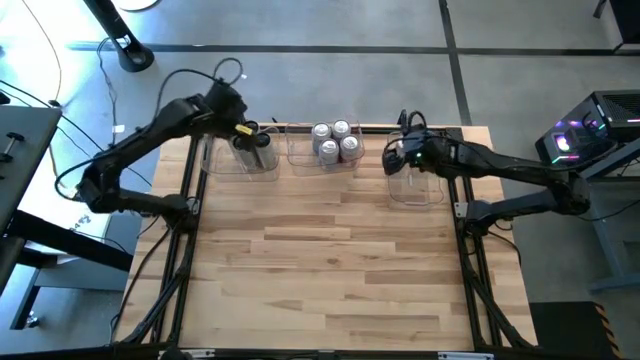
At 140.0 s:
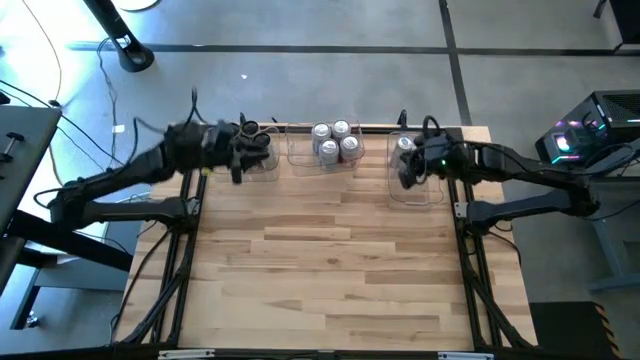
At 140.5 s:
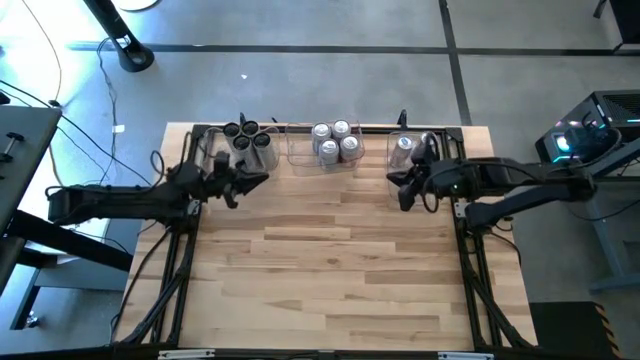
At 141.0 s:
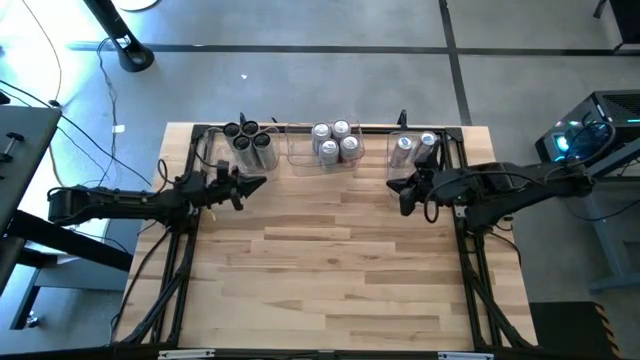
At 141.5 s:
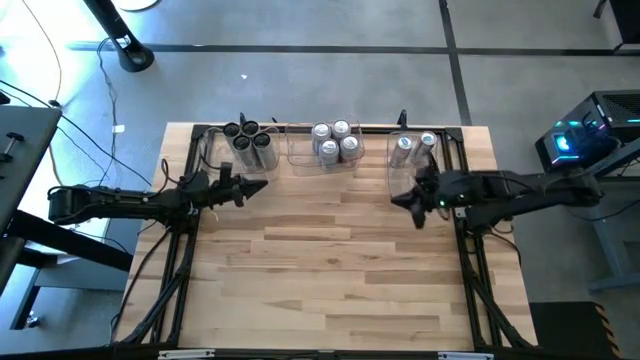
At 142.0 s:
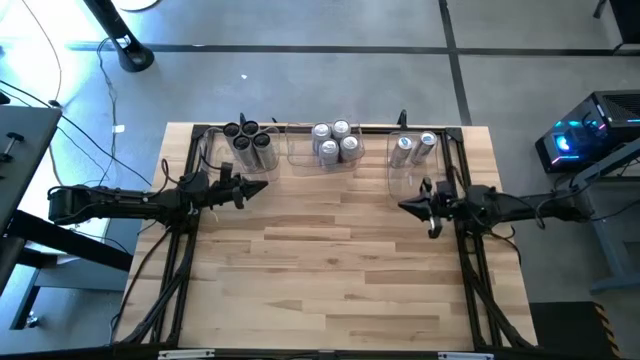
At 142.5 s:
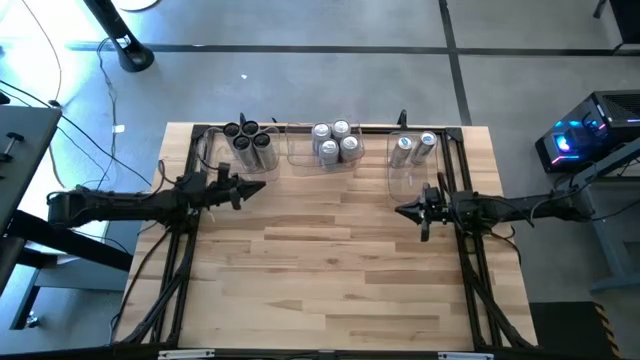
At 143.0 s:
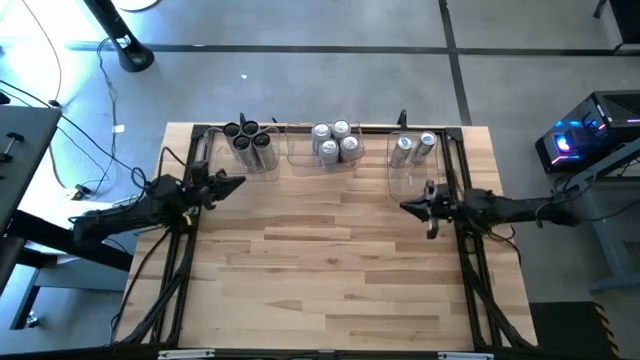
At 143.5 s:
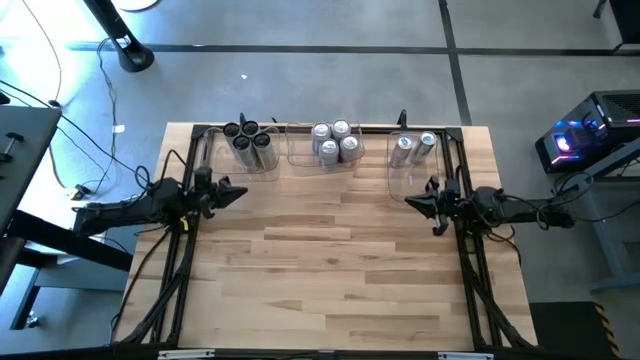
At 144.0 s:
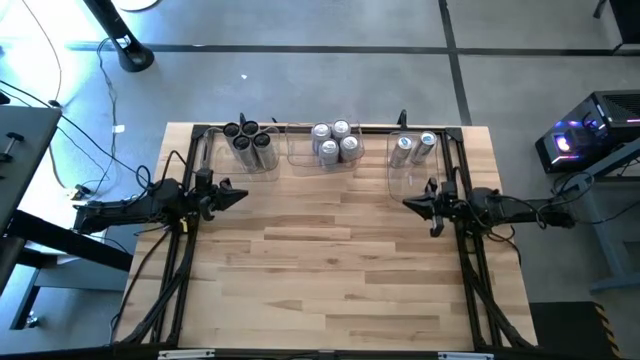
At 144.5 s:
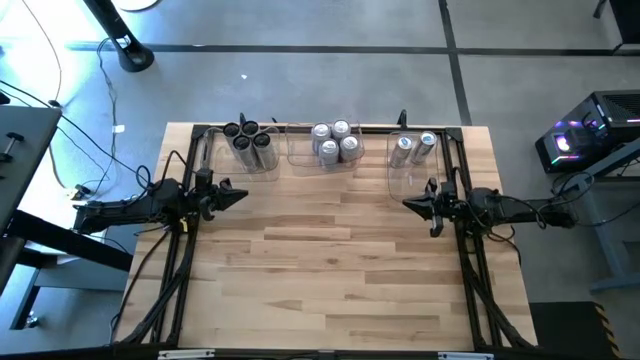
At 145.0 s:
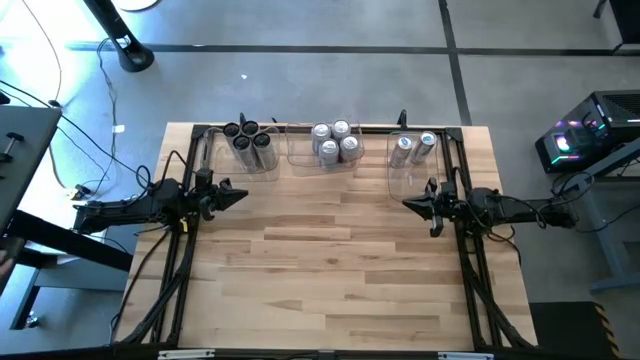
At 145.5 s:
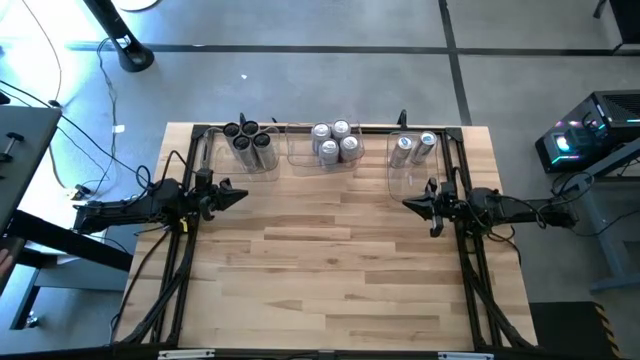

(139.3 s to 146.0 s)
Task: Sort soda cans
Return to Home Position

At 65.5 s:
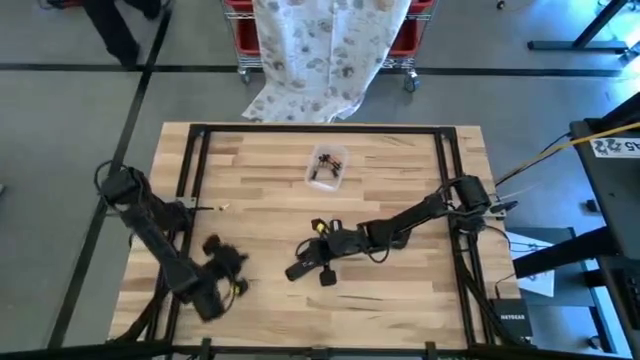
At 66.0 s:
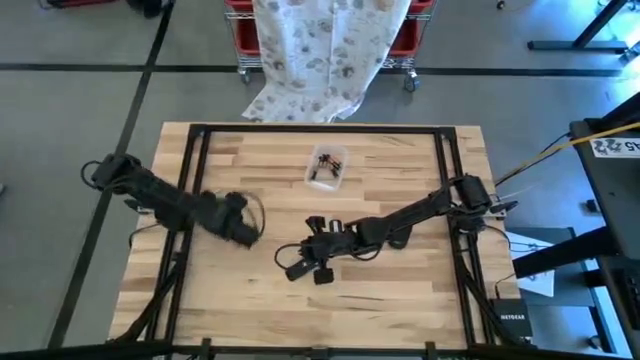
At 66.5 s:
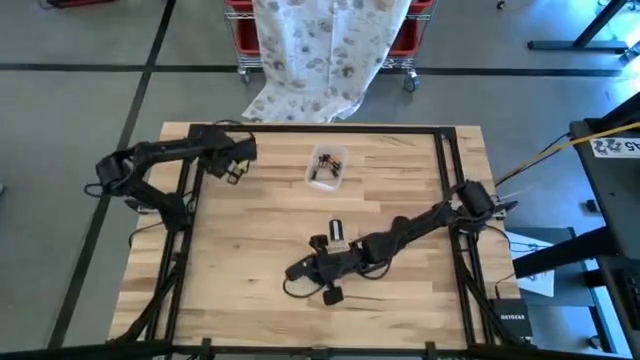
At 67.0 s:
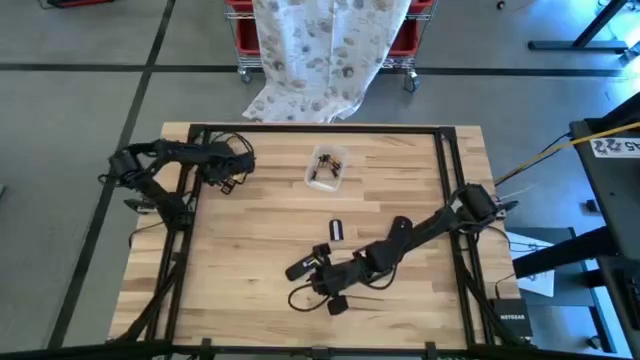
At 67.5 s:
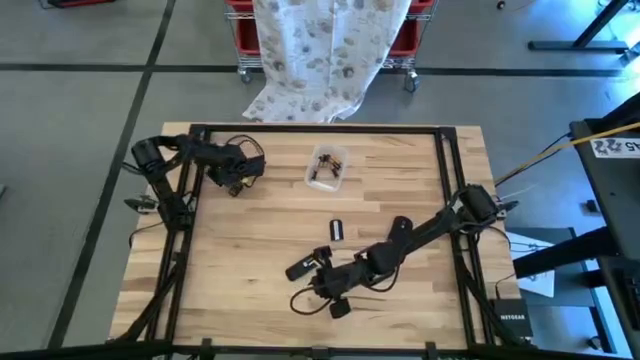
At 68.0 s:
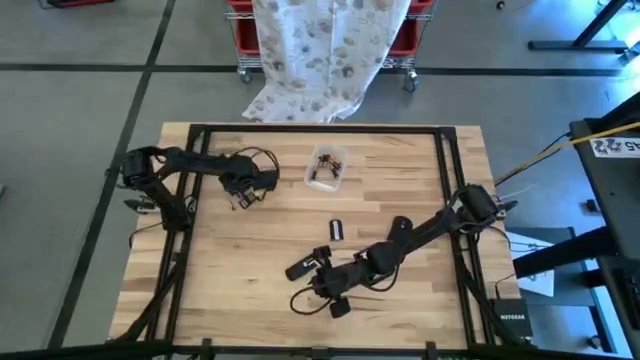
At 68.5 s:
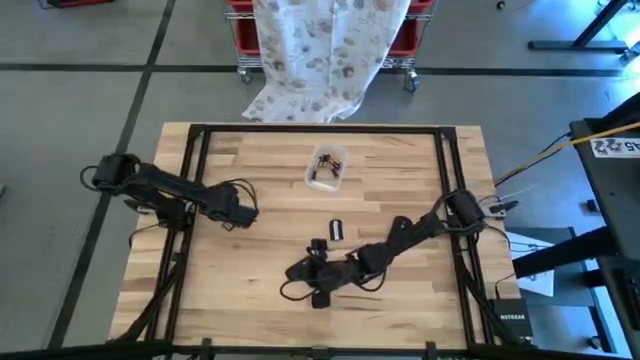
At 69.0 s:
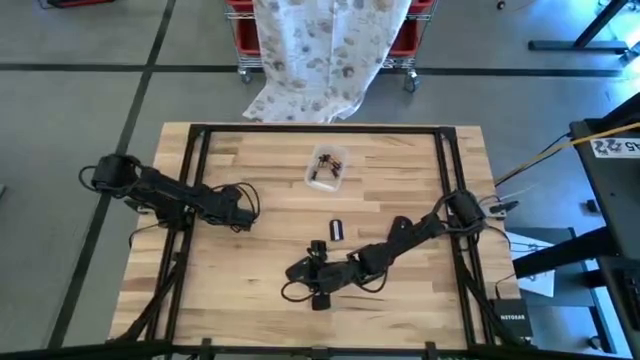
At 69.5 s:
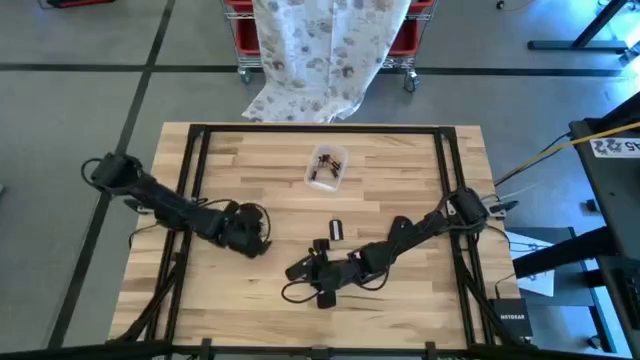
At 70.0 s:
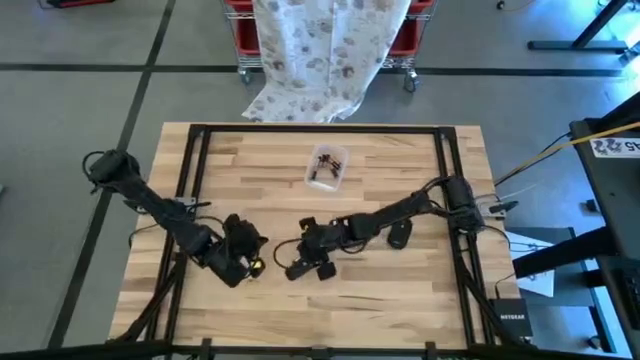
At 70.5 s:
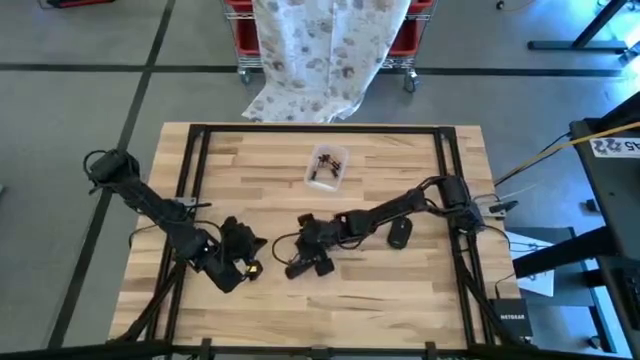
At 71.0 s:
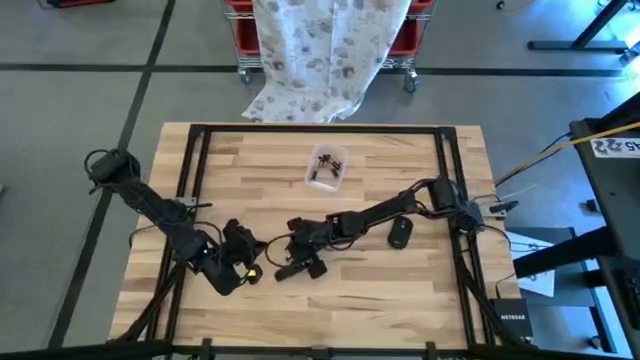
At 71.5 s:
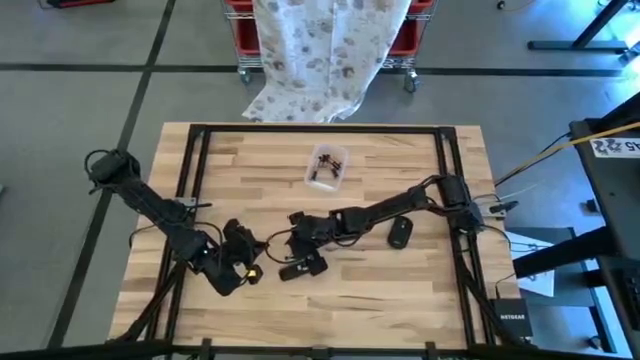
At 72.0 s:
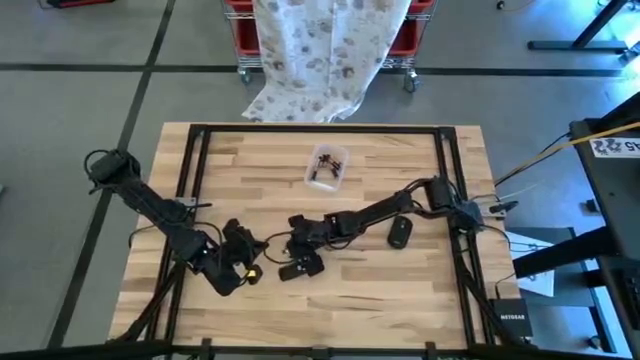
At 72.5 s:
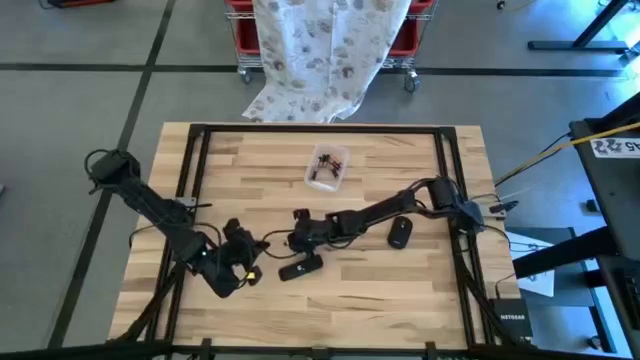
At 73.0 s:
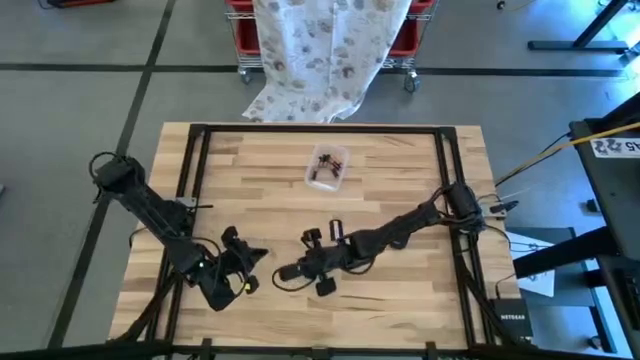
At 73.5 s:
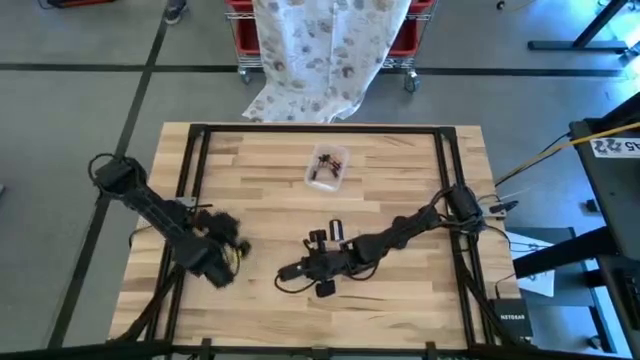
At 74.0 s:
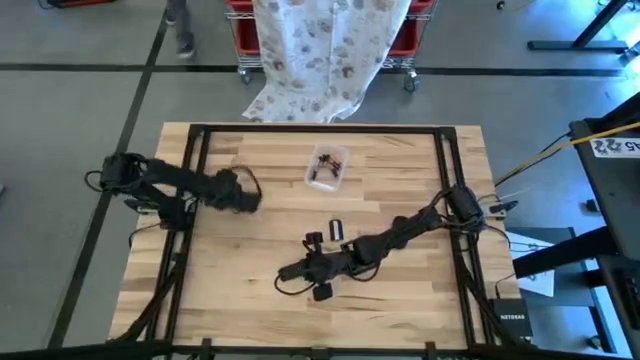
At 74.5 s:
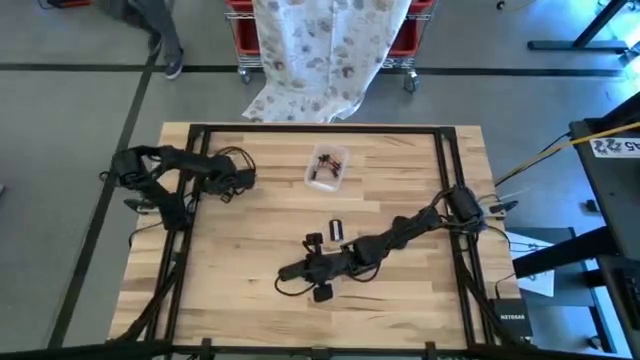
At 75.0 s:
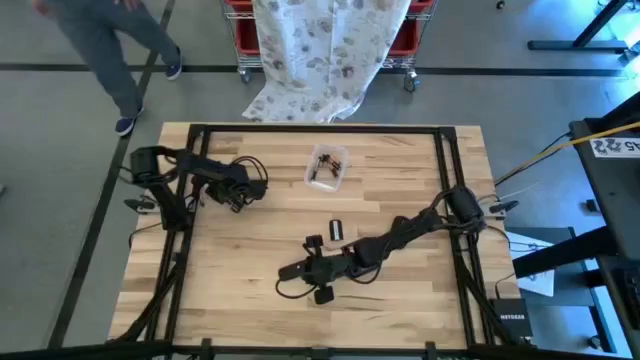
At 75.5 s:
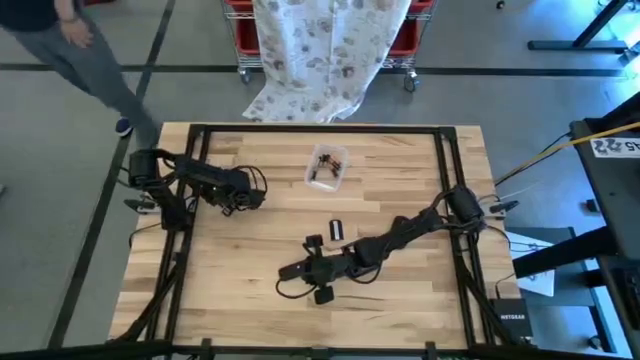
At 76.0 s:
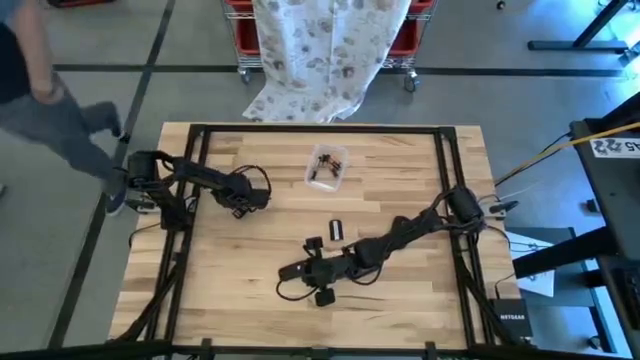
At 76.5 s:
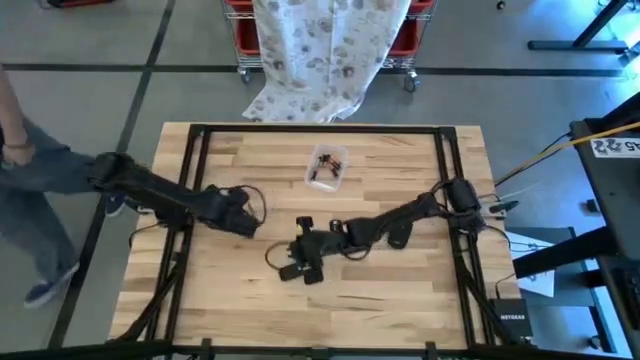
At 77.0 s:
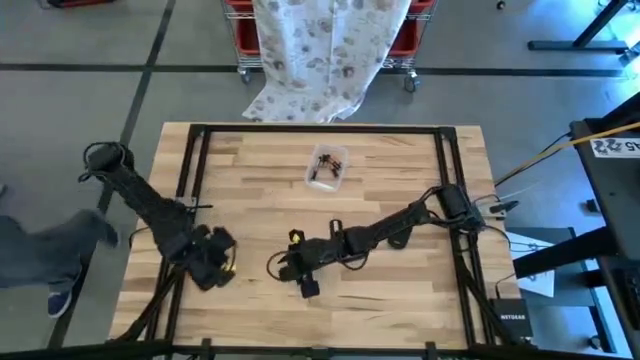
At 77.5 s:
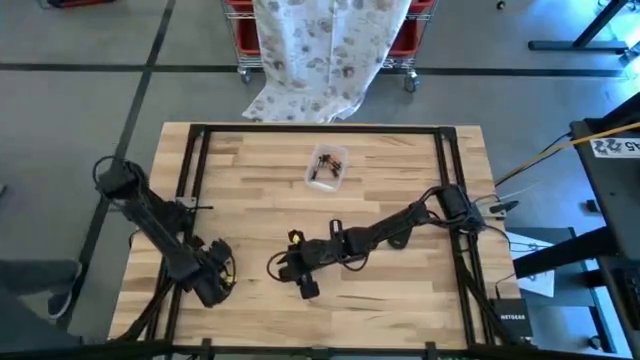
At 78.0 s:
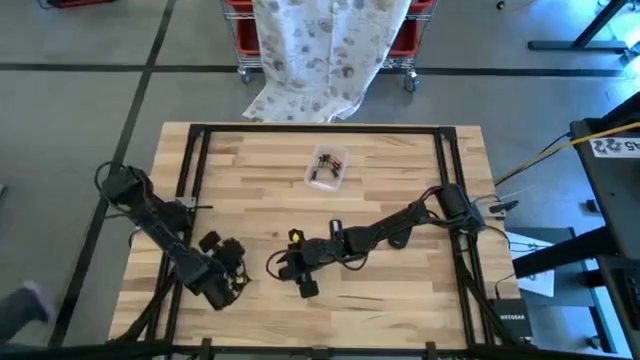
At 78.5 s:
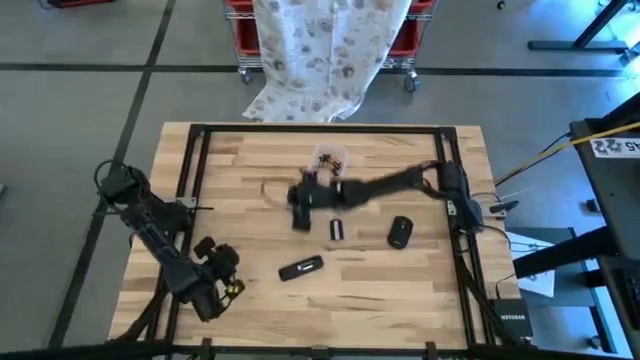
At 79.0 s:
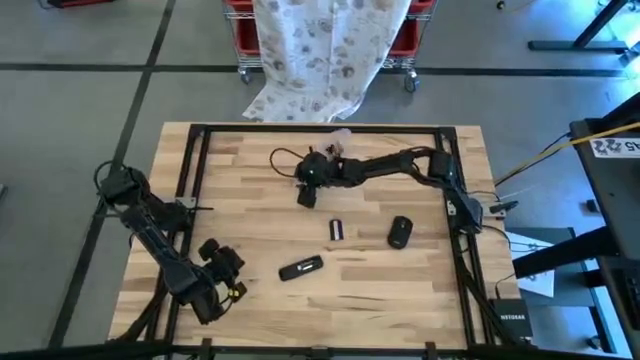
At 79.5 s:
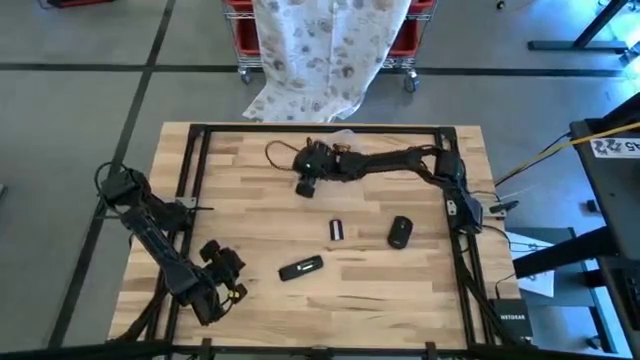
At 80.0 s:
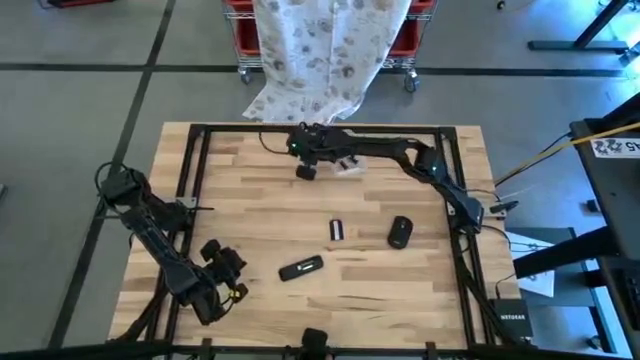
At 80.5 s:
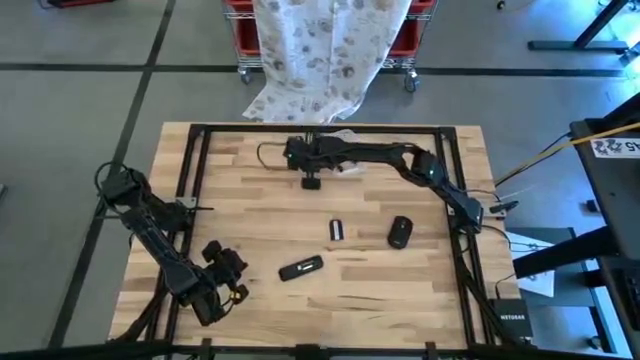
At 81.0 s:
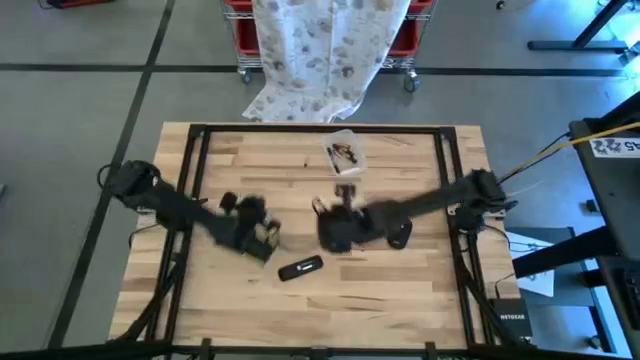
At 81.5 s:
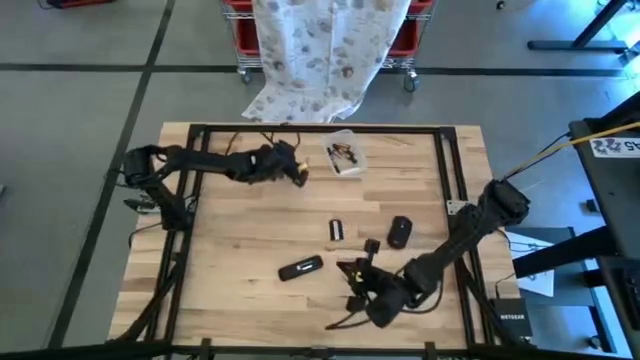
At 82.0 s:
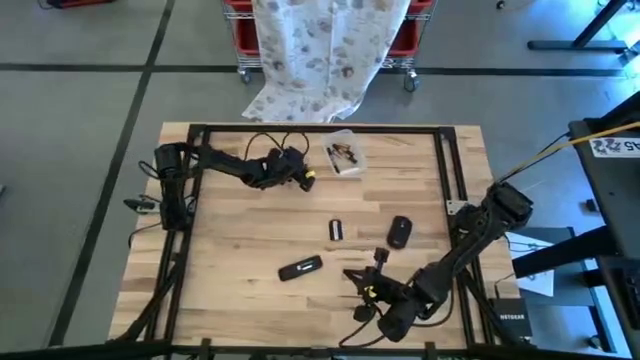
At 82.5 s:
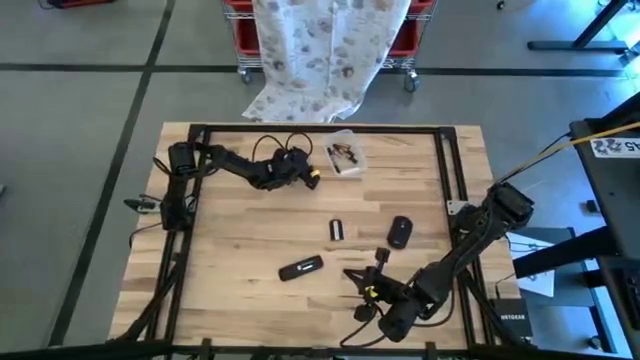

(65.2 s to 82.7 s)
Task: Insert battery
Insert the white battery into the remote control
